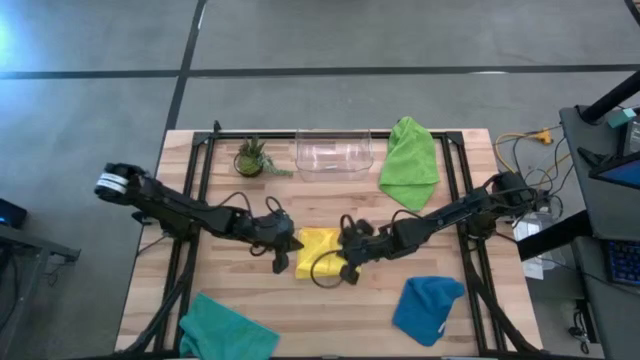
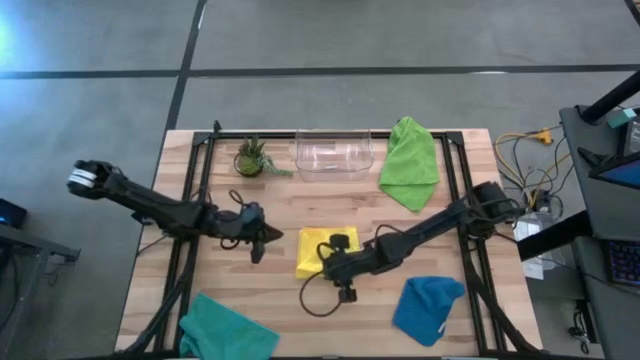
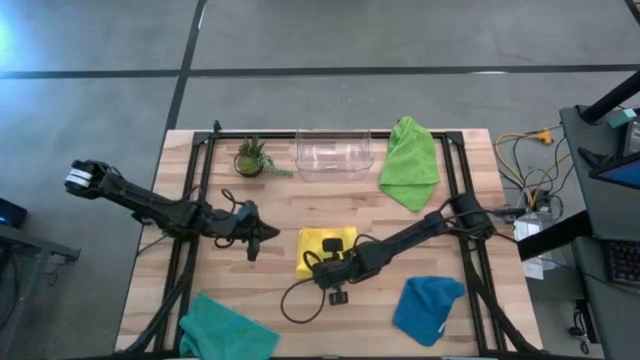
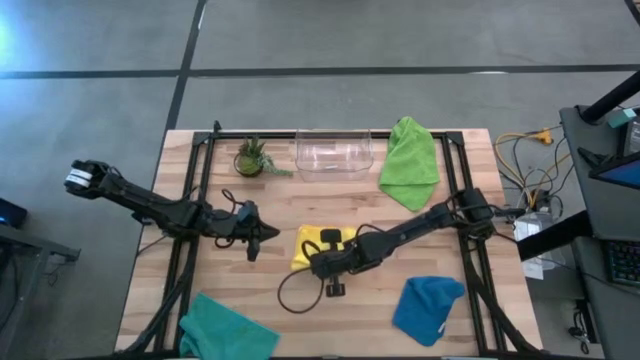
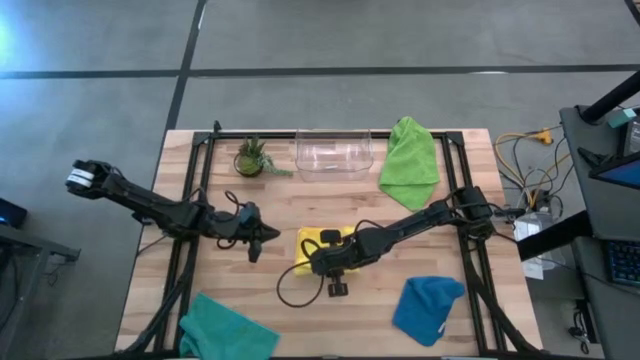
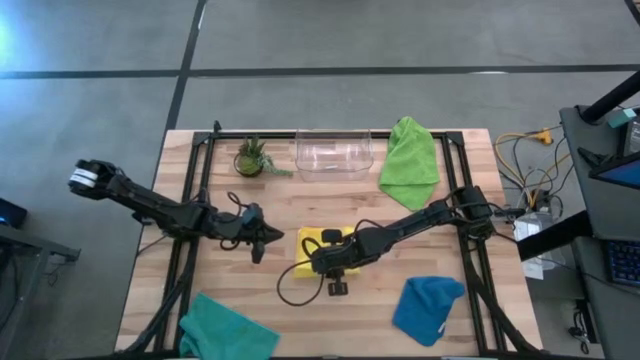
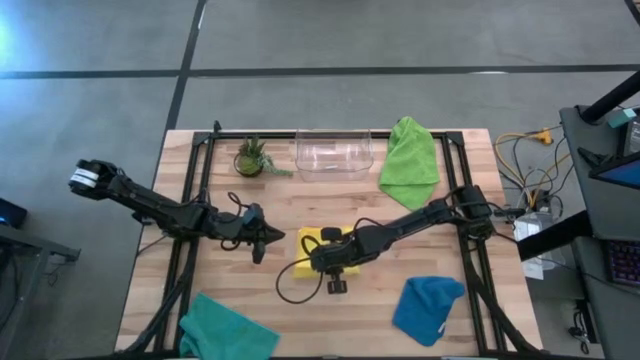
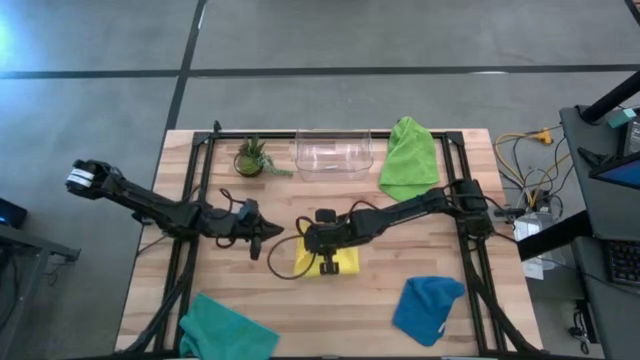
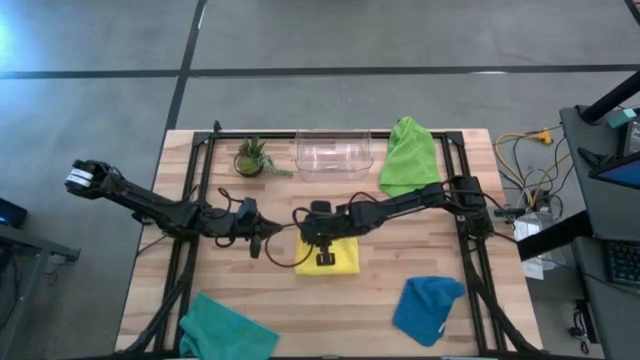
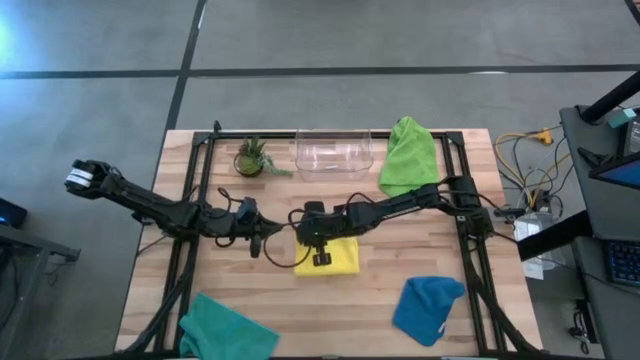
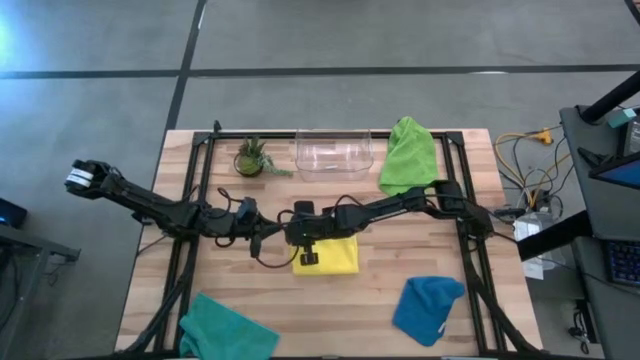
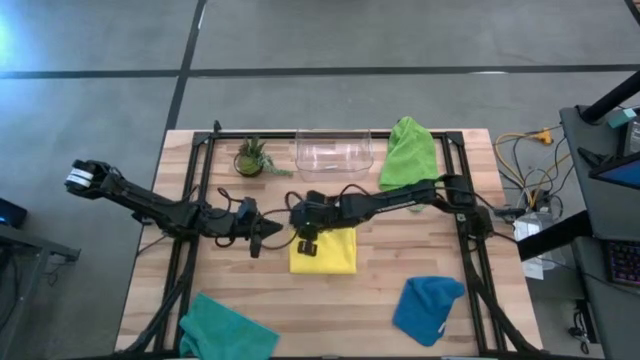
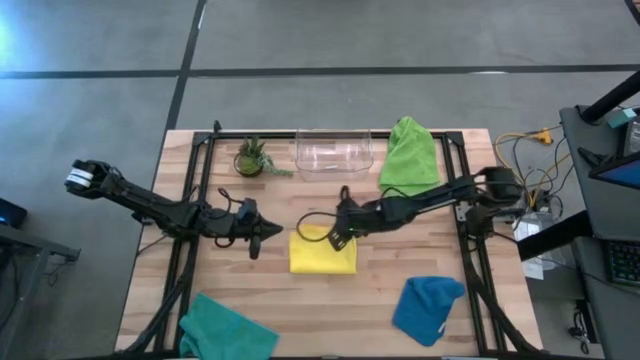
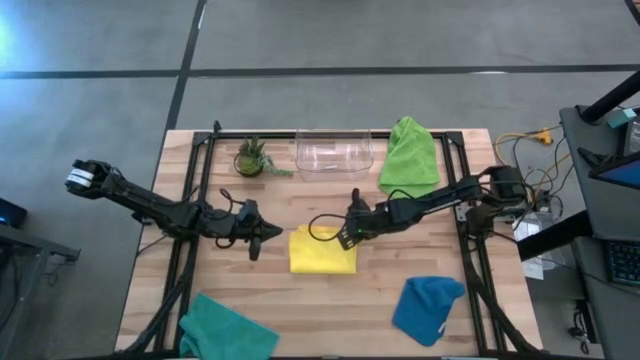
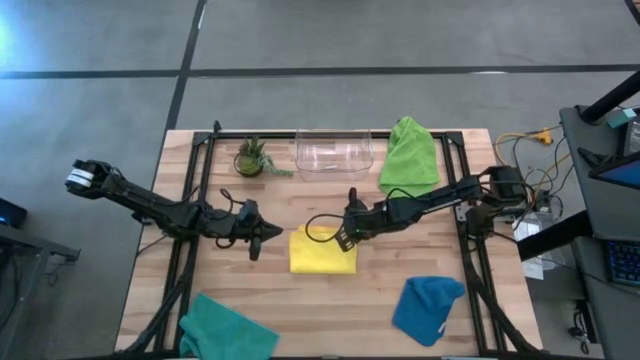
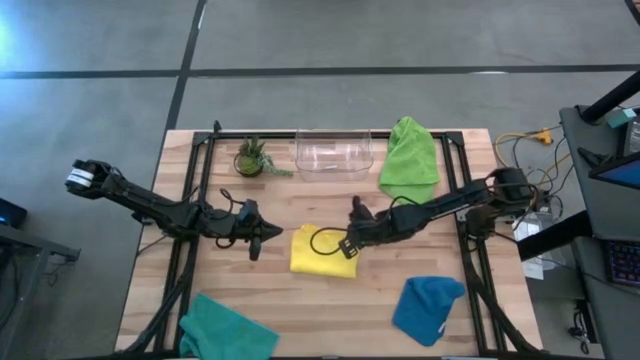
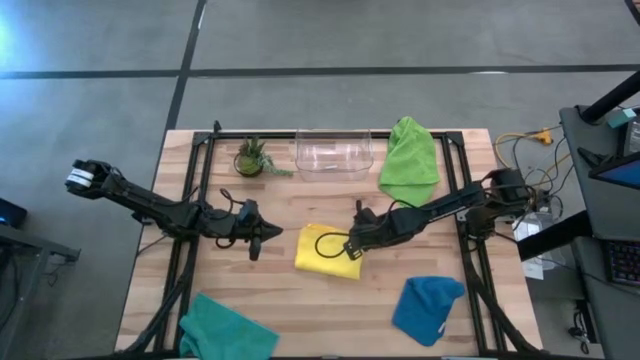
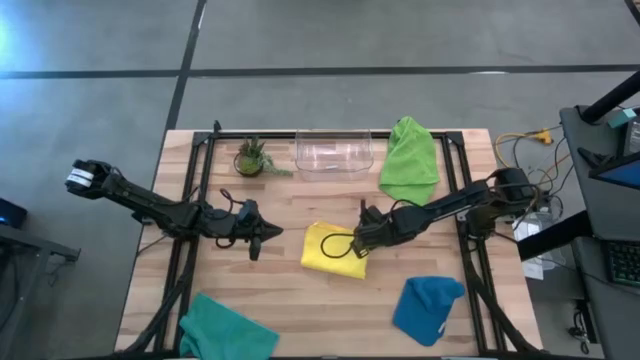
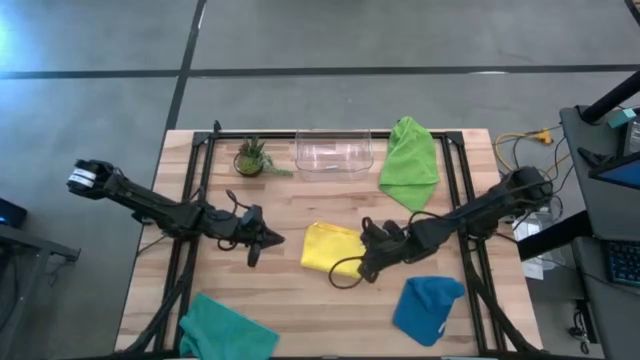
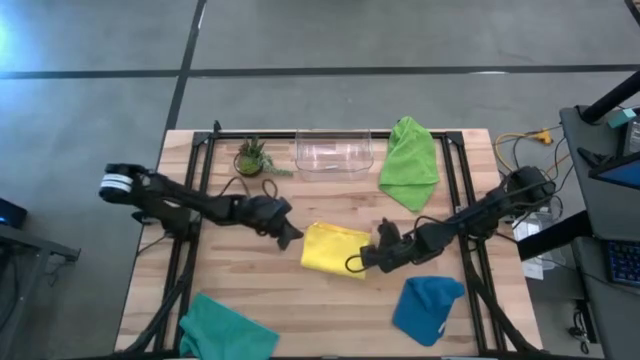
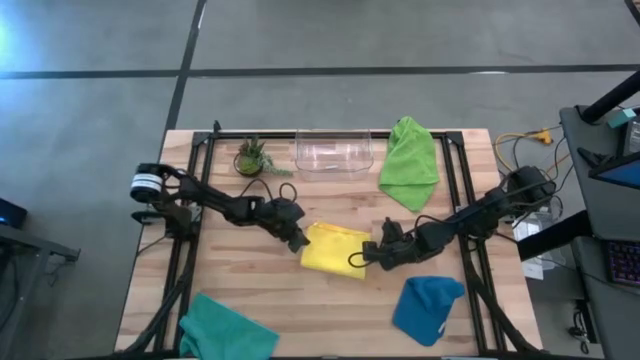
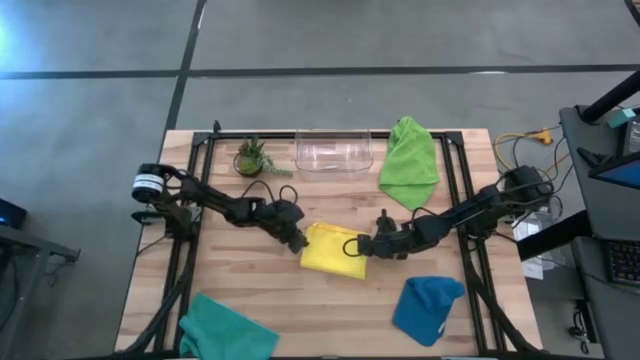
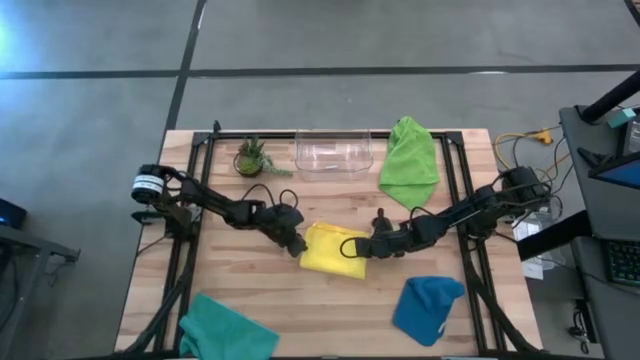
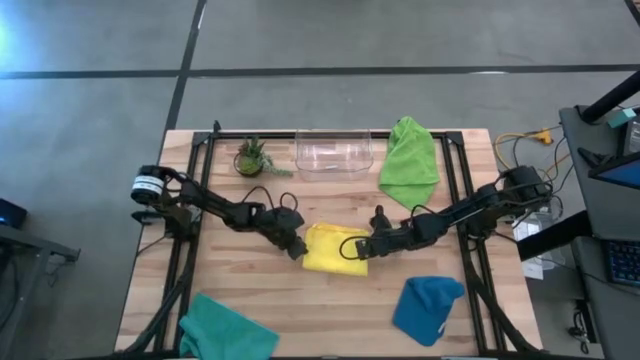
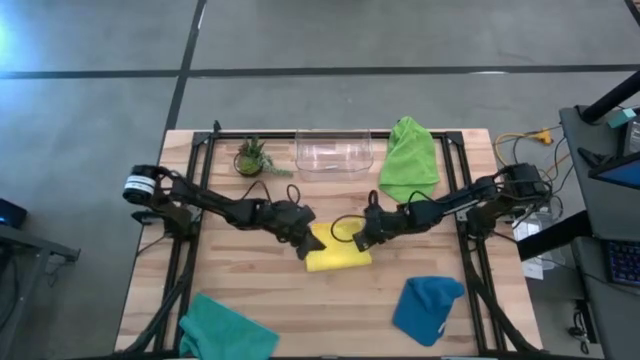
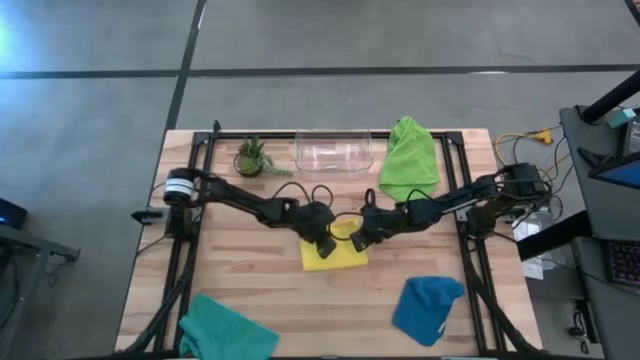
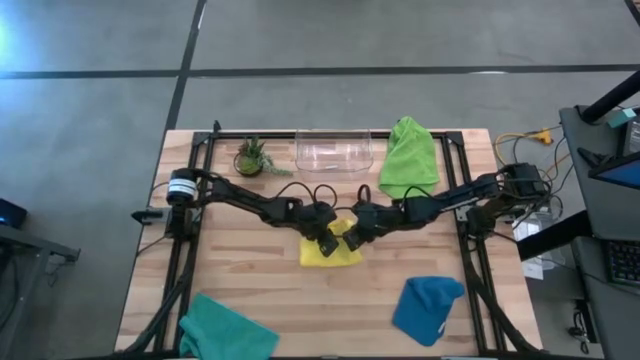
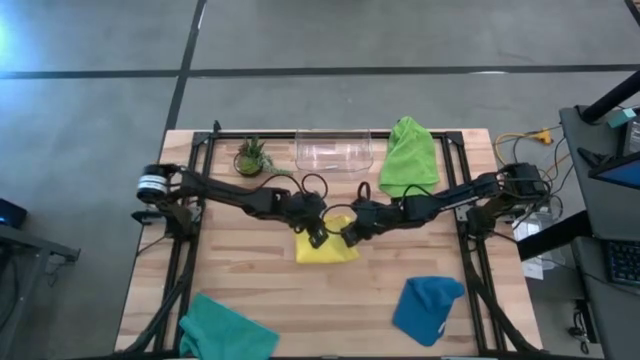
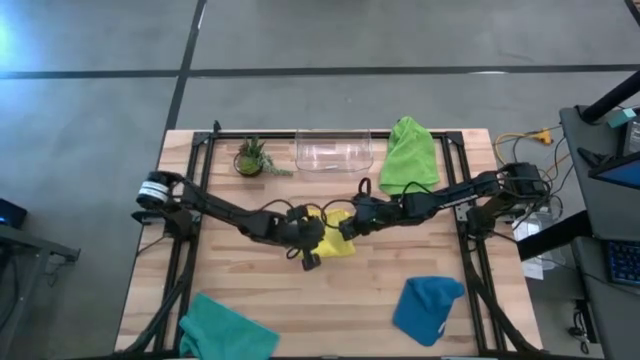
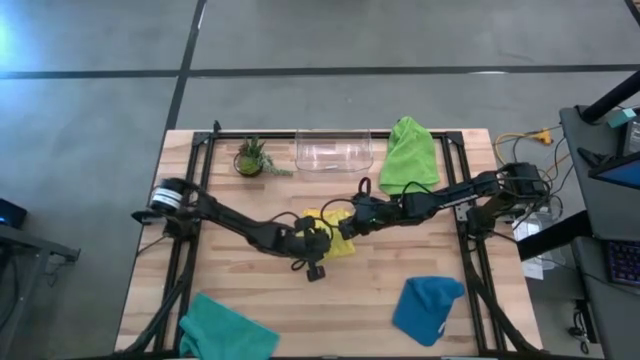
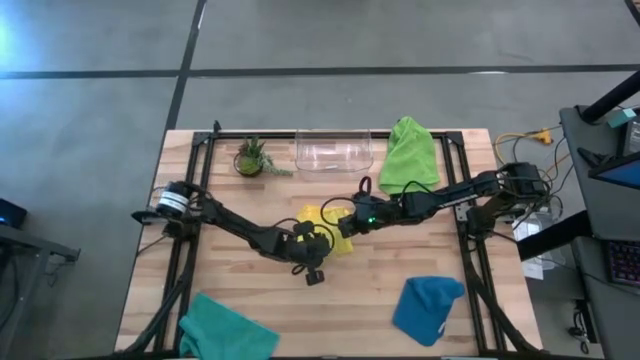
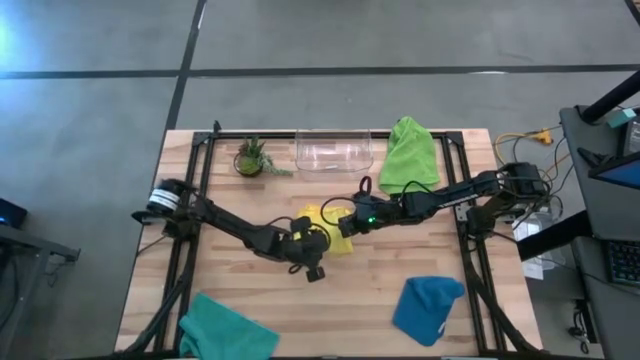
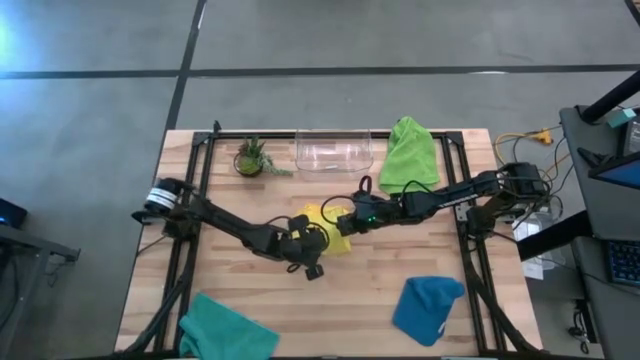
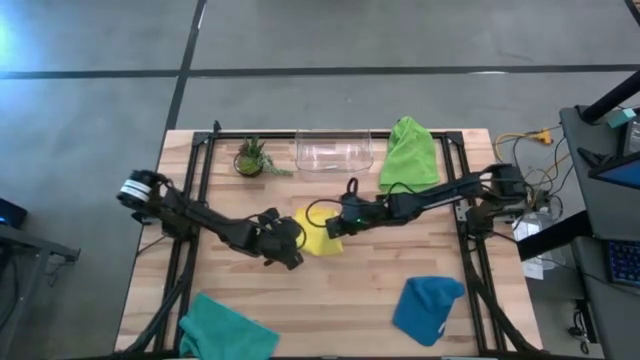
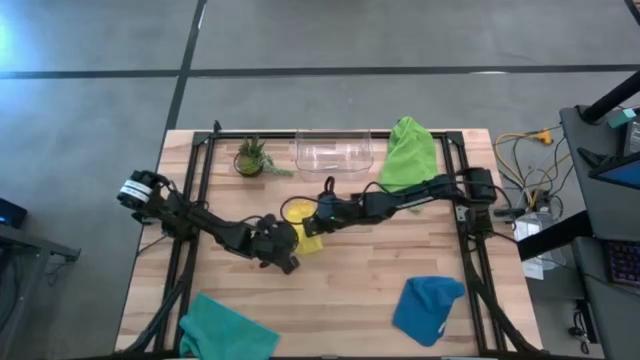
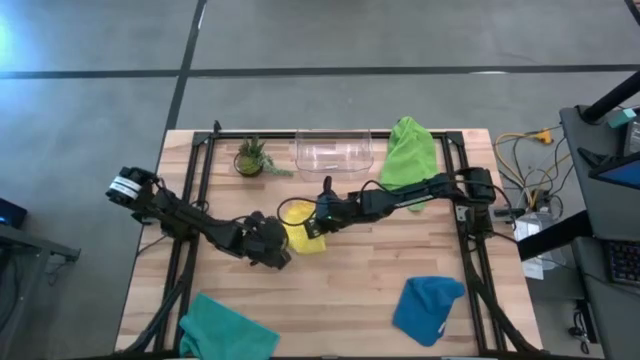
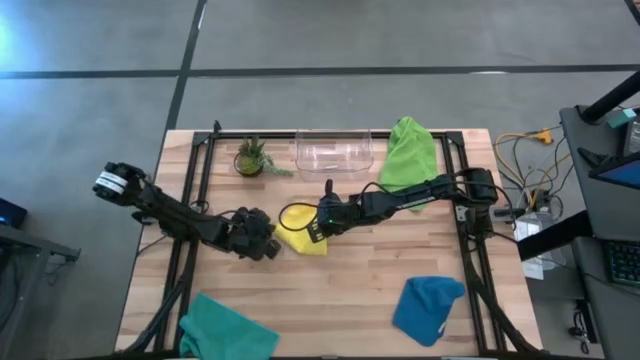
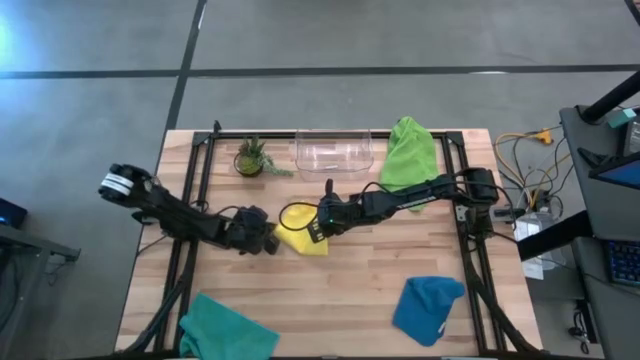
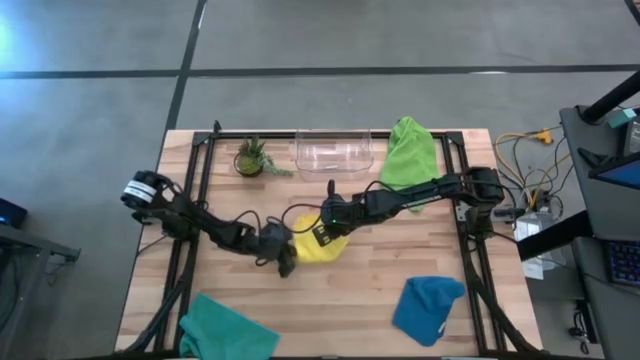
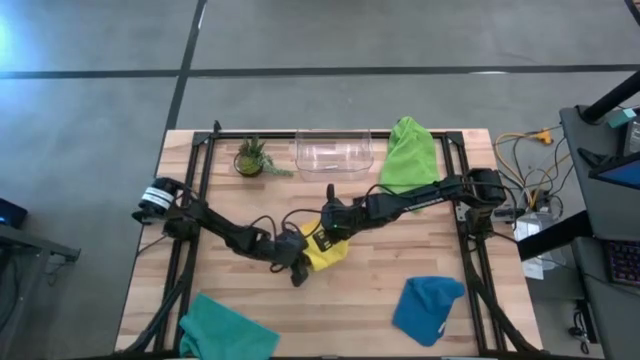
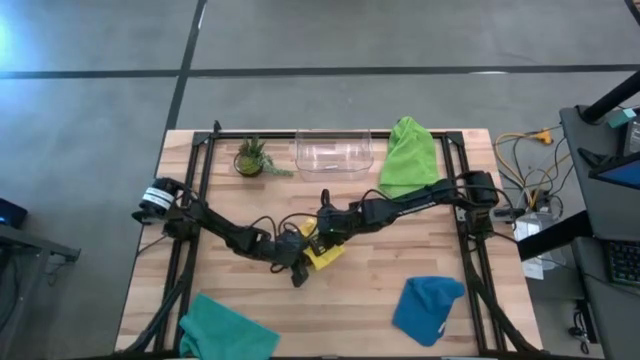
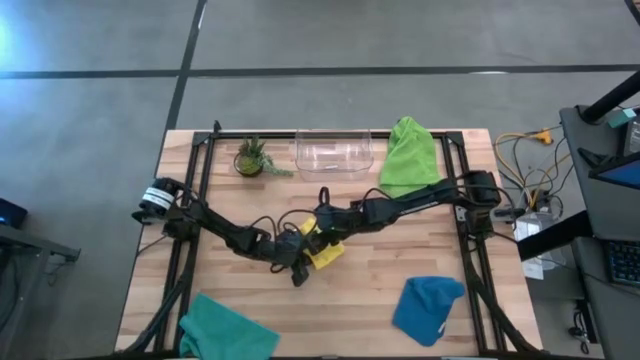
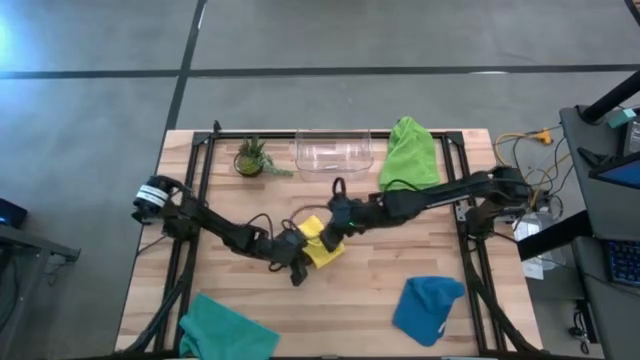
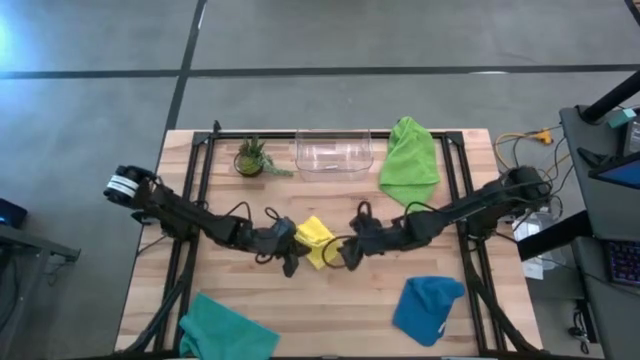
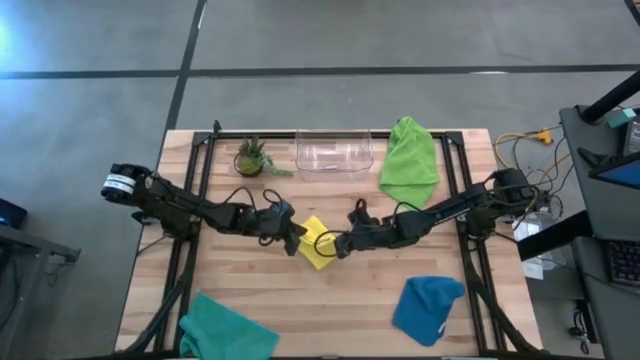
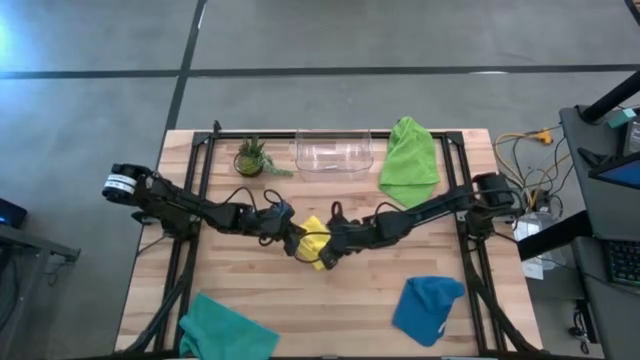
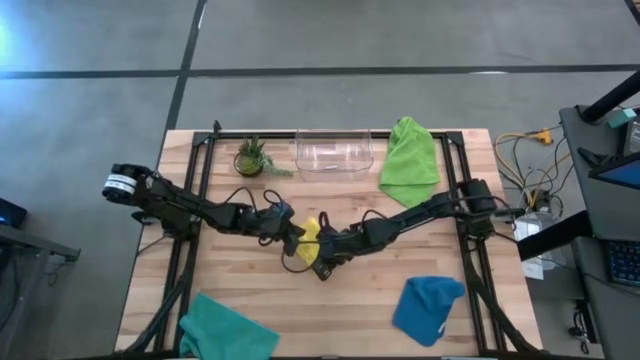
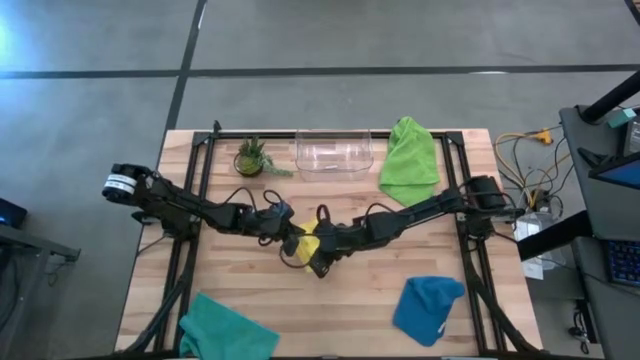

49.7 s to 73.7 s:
Task: Fold microfiber towels
Fold the yellow microfiber towel
